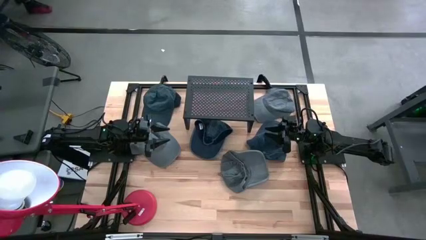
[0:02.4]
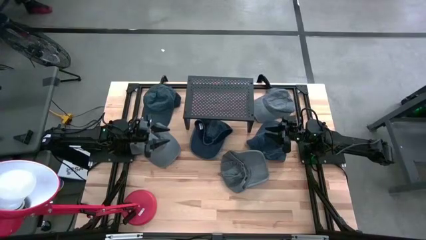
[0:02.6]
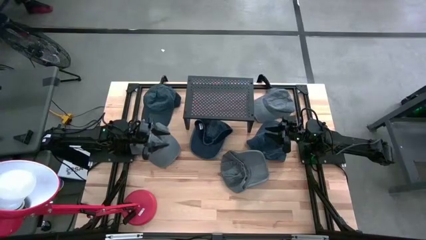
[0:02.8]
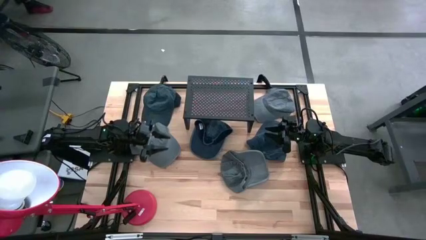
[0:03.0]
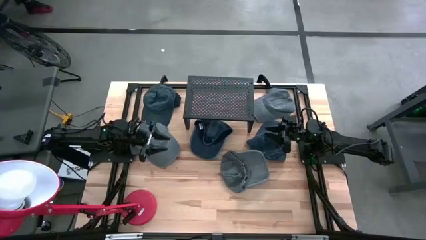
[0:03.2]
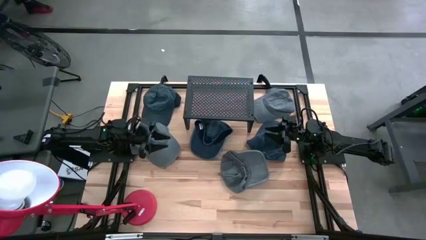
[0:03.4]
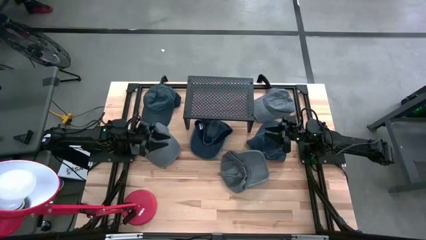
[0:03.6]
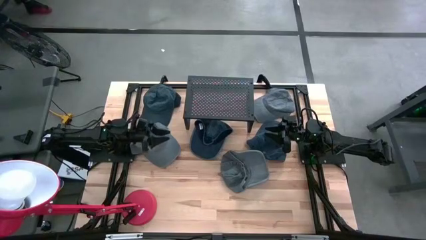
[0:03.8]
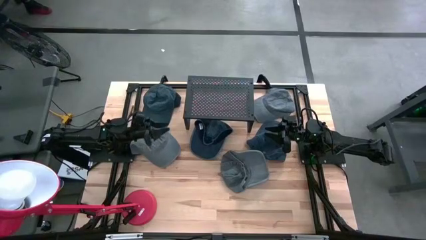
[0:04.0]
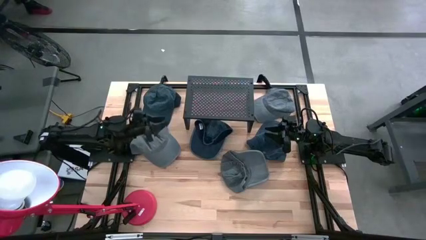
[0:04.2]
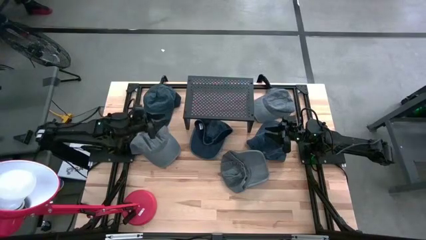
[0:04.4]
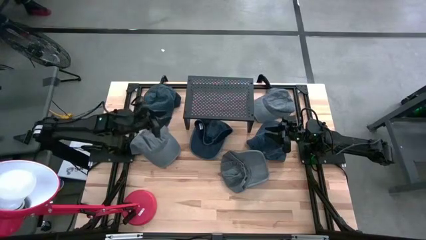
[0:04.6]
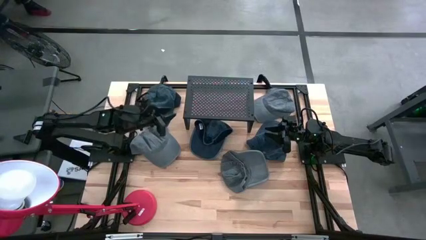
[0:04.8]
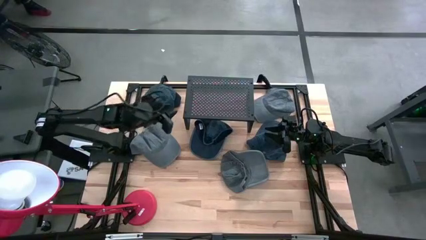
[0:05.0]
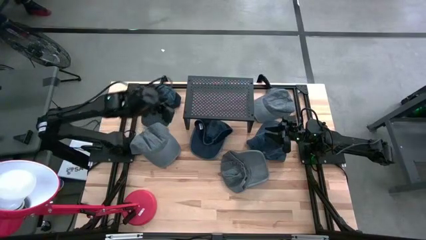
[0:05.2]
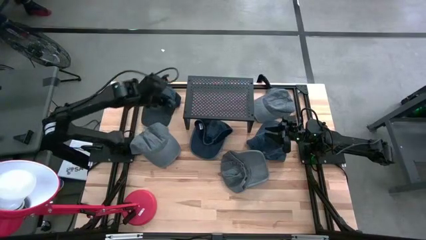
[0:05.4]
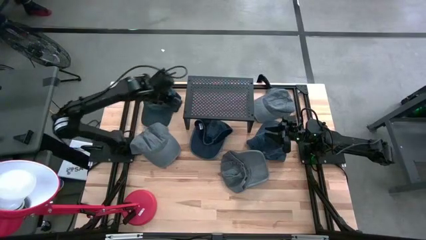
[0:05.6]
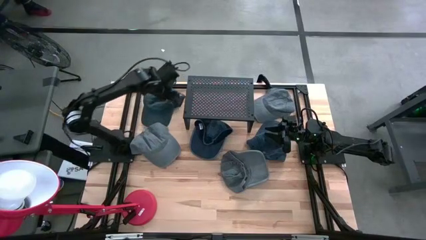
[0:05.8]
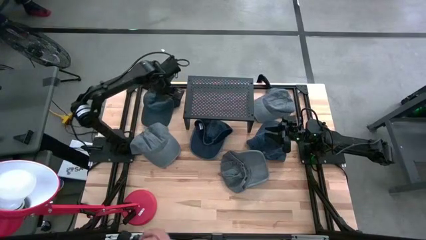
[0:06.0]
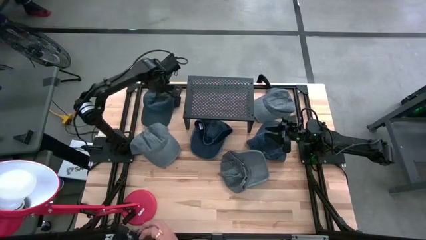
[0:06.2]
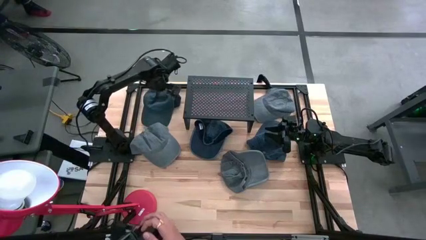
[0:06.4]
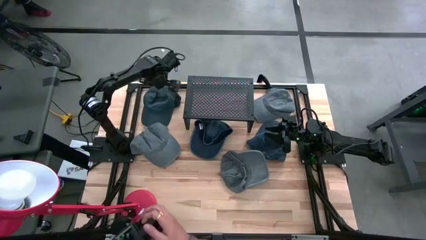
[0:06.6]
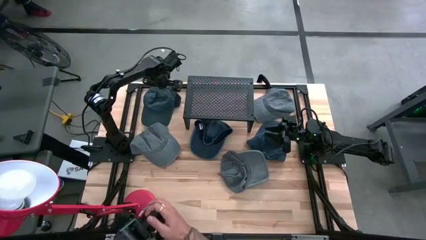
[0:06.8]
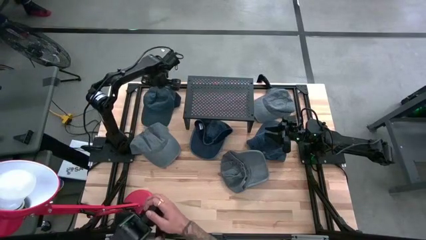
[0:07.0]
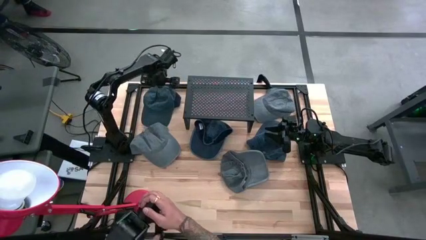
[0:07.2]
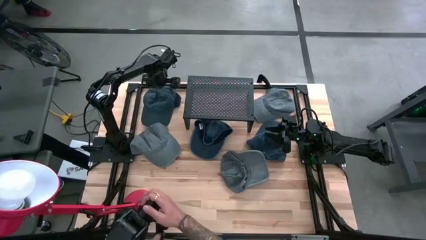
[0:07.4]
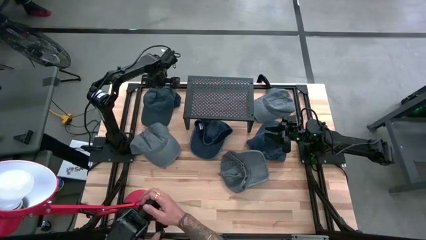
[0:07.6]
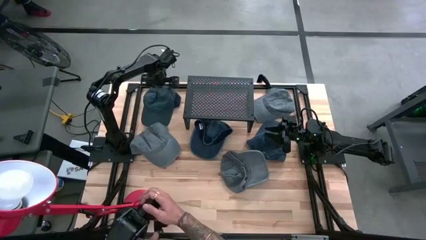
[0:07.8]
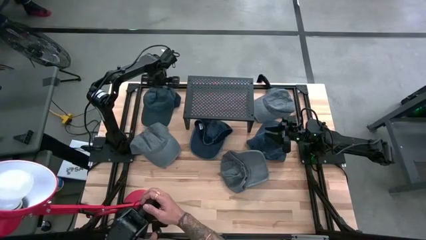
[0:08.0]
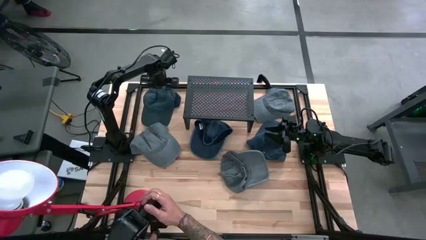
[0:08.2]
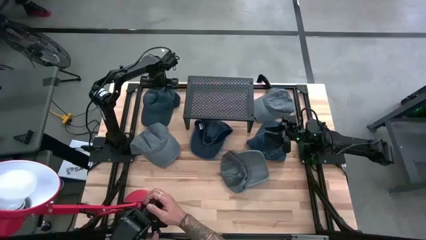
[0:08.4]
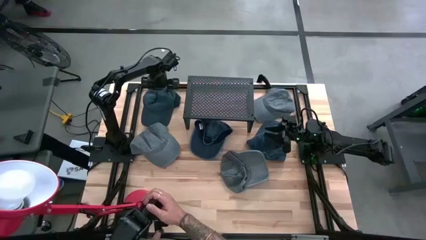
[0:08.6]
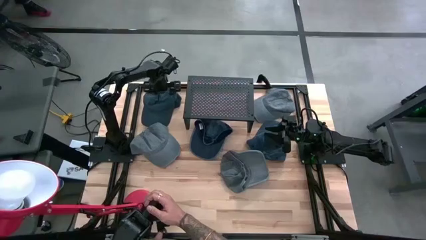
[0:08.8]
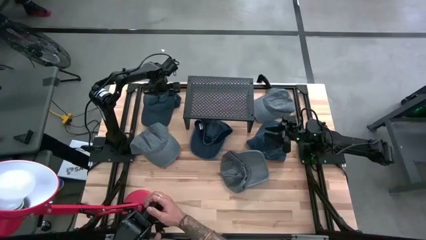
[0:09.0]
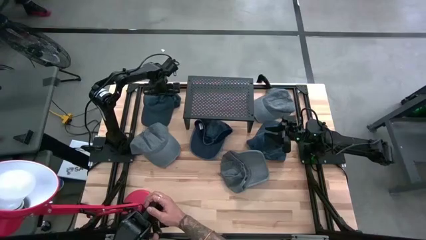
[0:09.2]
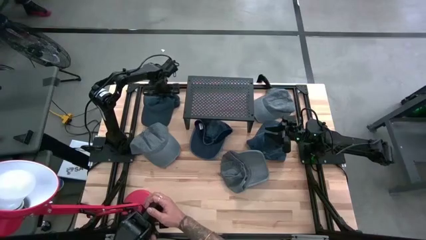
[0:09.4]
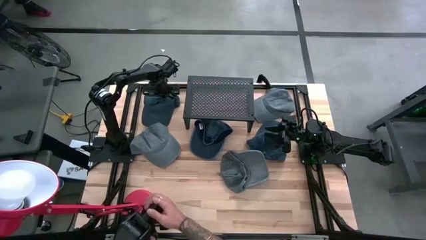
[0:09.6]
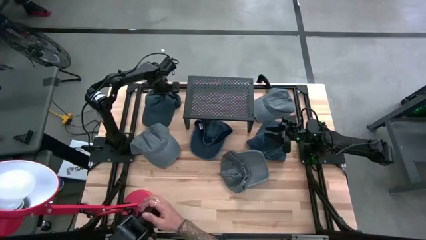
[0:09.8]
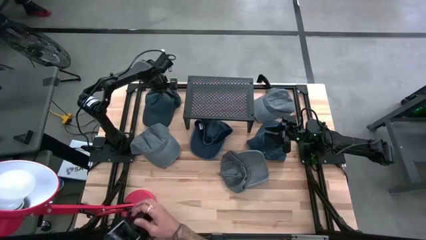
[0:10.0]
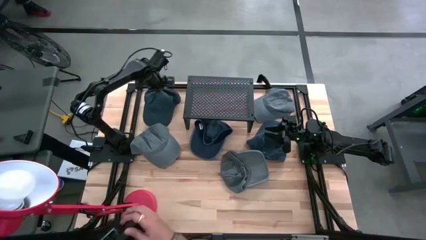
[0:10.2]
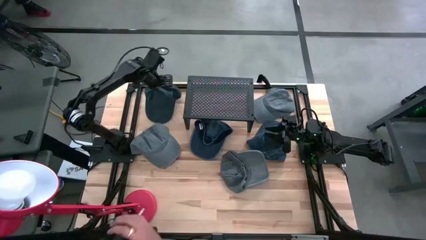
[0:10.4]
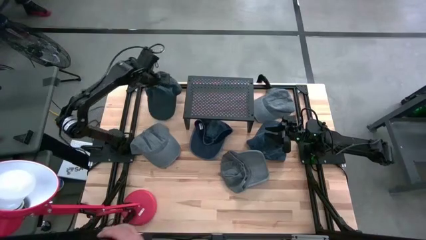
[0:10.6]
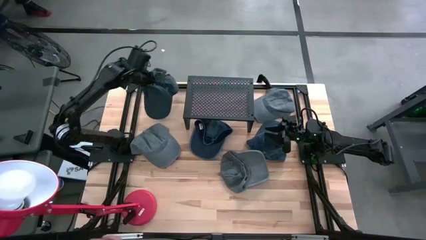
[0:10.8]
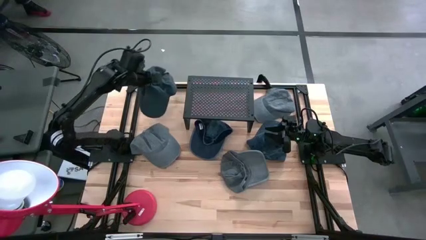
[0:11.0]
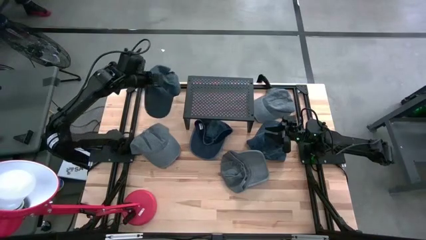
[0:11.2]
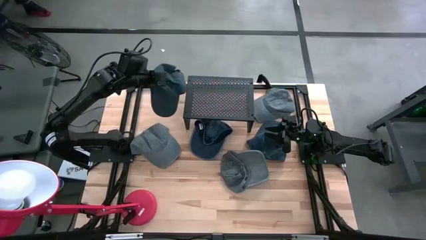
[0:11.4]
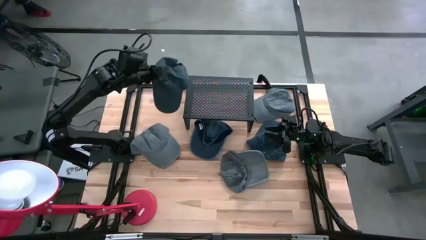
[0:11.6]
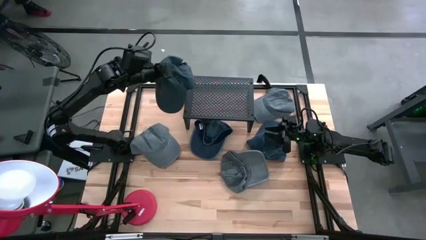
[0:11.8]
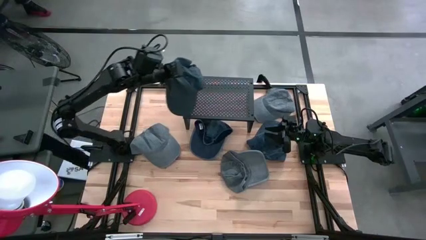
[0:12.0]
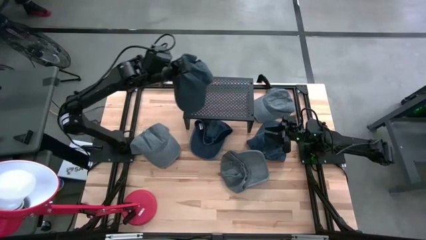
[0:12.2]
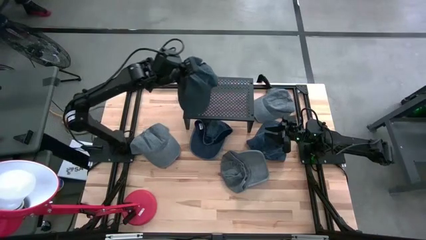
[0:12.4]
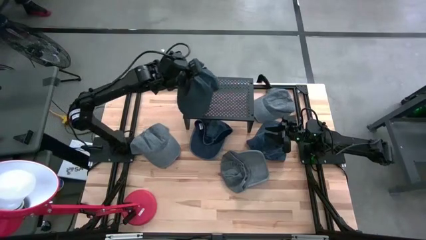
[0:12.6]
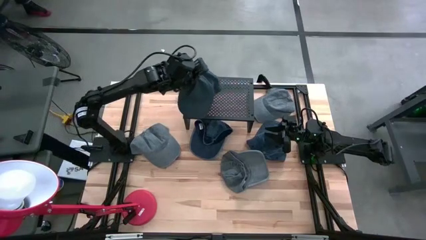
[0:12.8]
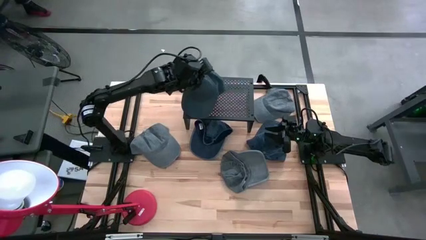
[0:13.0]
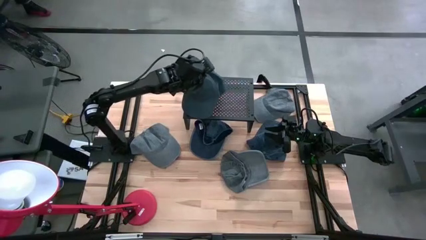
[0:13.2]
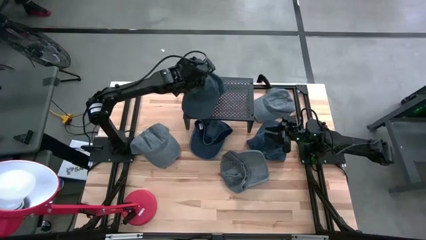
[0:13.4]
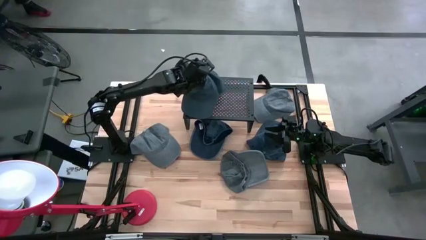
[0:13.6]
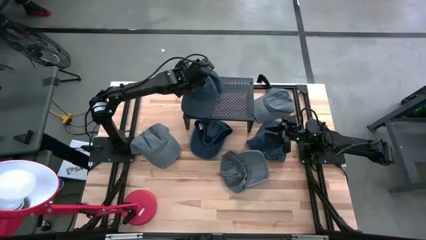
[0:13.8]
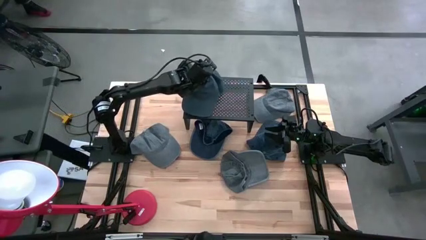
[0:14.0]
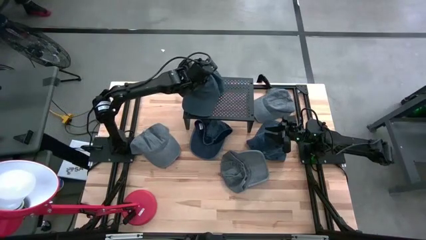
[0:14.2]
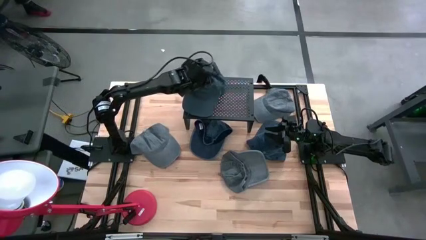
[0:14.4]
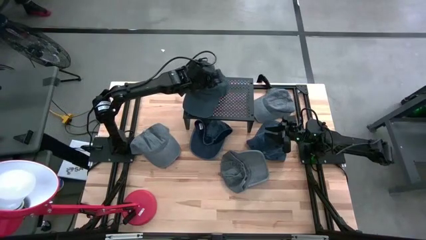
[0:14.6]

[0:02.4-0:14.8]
Task: Pick & Place hat
Put the top blue cap on the shelf

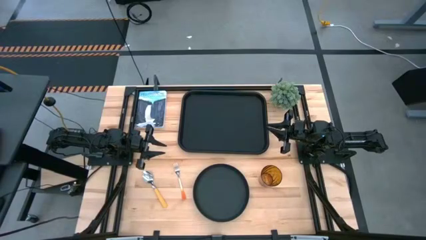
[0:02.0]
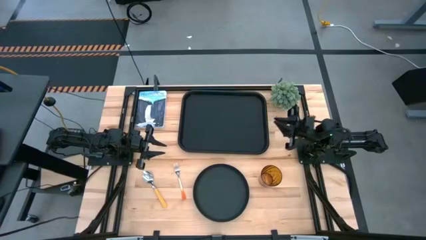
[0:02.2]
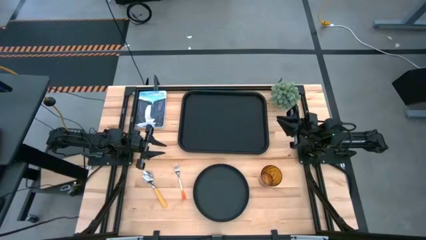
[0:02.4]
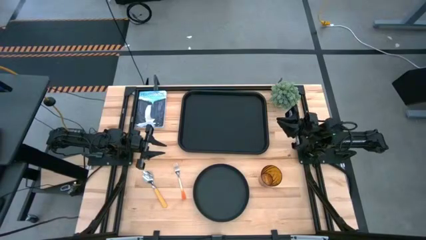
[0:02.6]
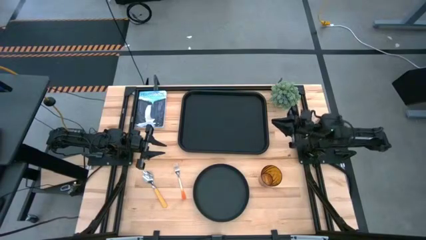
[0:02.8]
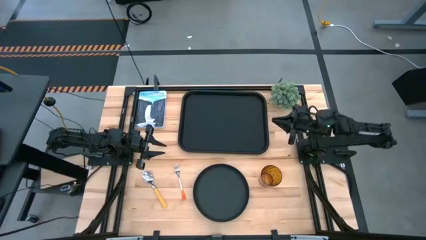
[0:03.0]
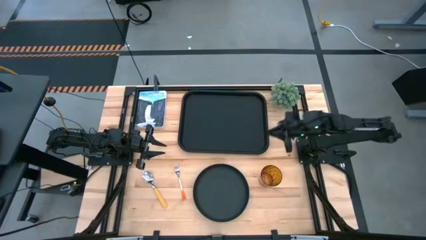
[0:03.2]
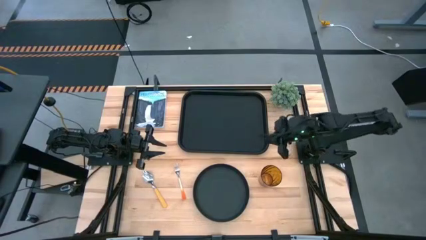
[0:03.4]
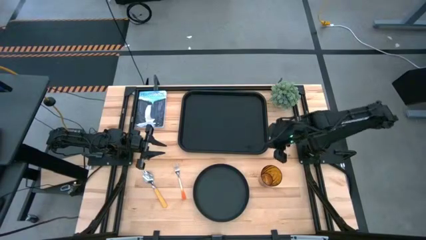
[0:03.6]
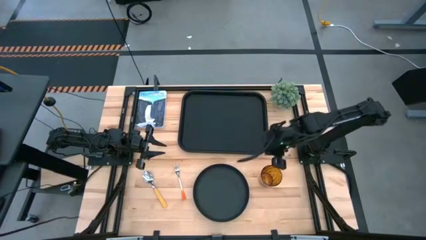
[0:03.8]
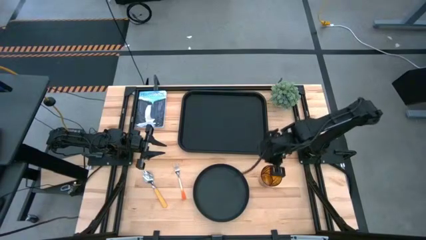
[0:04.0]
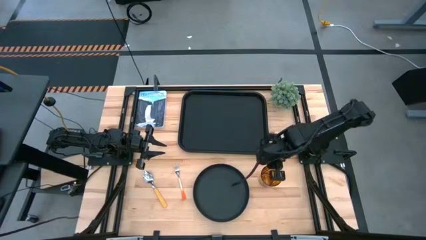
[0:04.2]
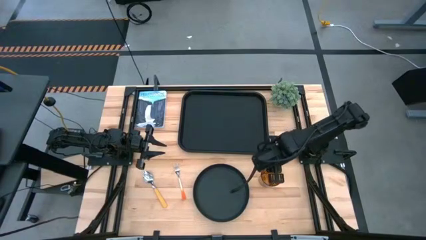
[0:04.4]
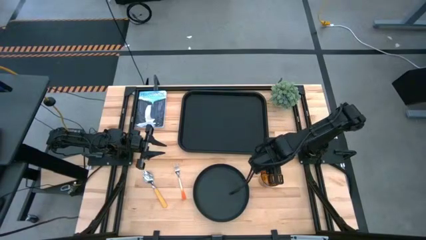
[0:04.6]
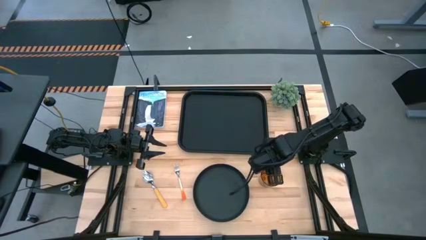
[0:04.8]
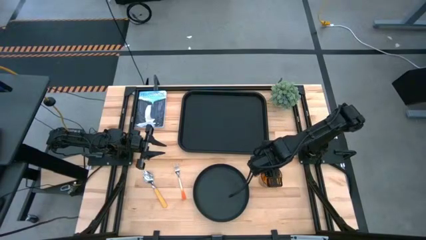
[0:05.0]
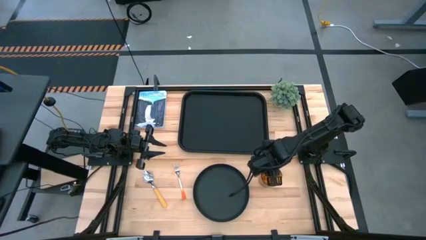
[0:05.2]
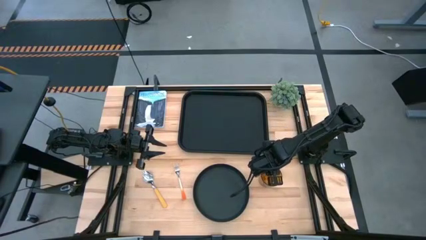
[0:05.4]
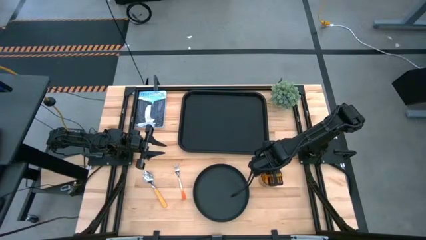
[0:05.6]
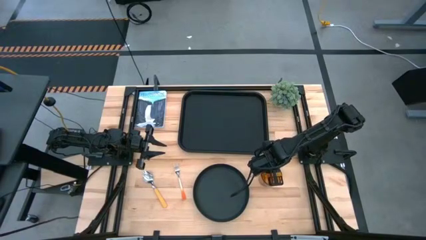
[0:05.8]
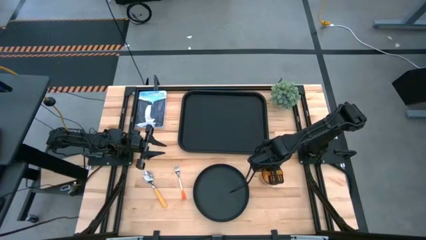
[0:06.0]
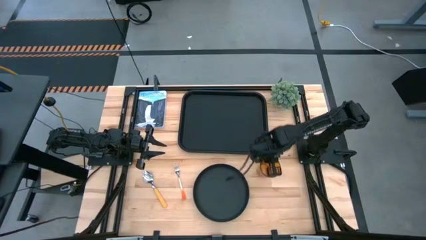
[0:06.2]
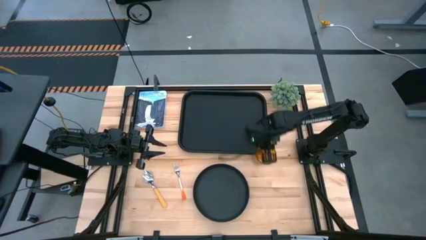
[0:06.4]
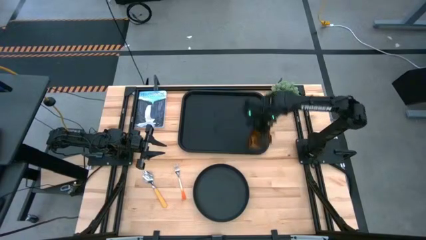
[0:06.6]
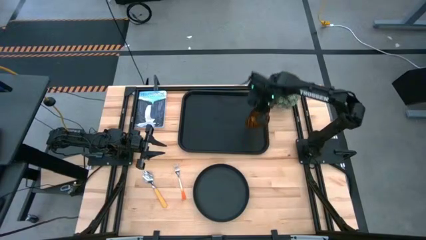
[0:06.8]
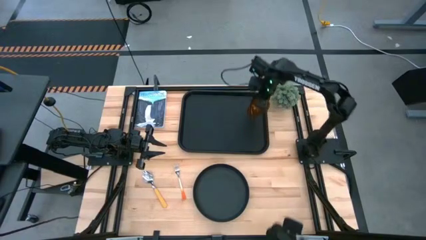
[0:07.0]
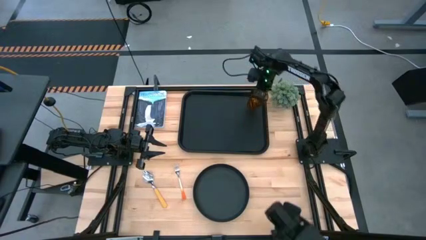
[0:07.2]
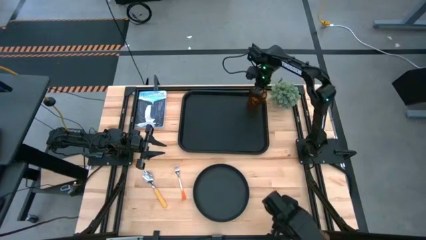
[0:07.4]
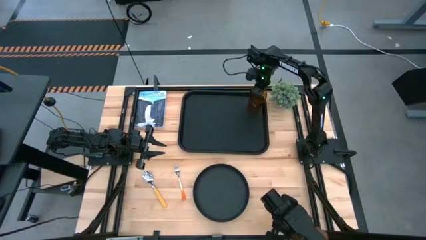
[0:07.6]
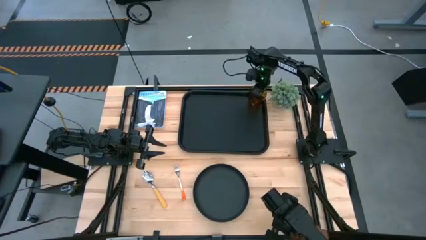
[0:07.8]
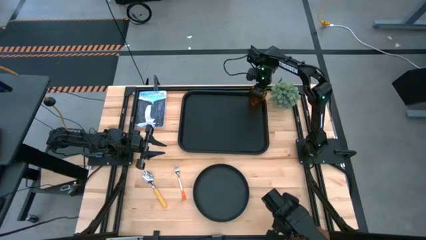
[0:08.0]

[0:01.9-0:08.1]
Task: Pick and place plate/cup/fork/spoon on tray
Put the brown cup on the top right of the black serving tray
